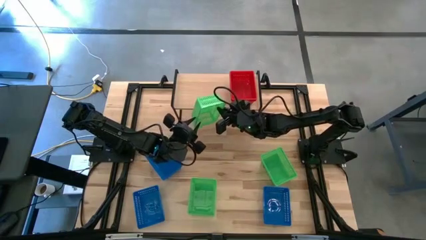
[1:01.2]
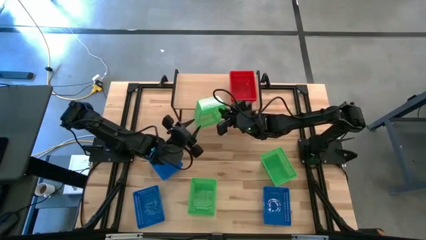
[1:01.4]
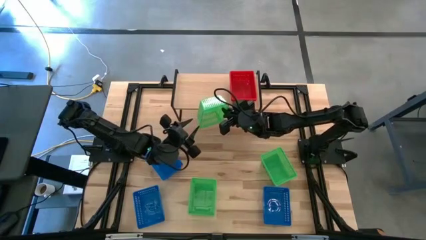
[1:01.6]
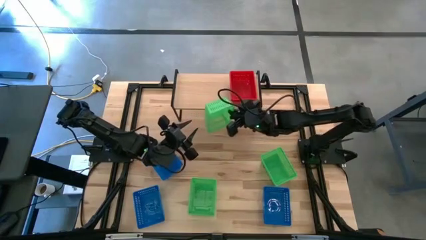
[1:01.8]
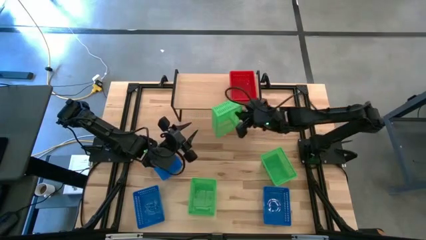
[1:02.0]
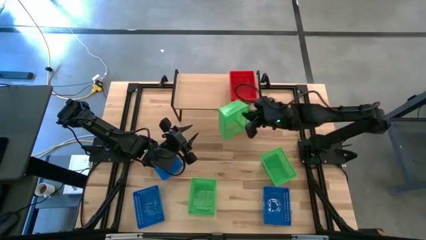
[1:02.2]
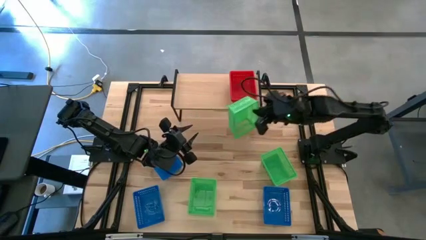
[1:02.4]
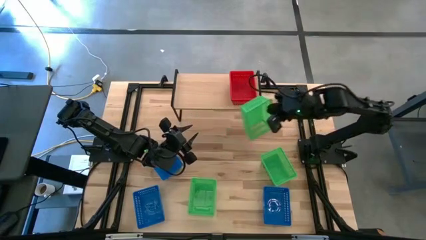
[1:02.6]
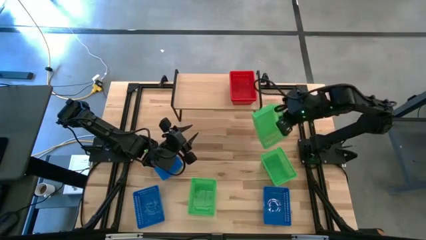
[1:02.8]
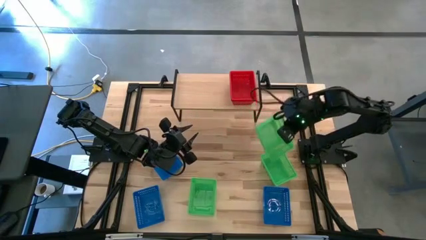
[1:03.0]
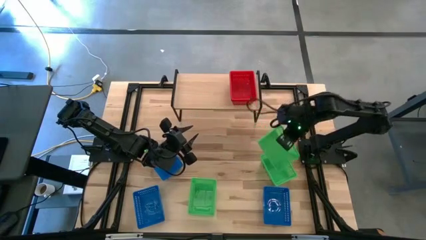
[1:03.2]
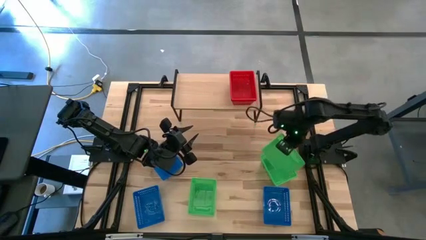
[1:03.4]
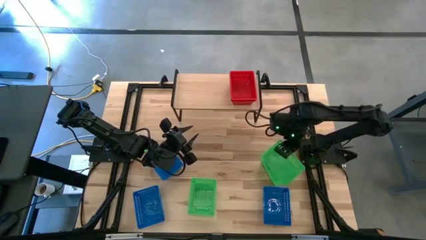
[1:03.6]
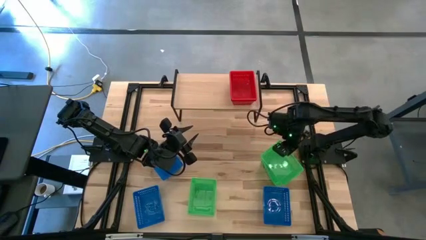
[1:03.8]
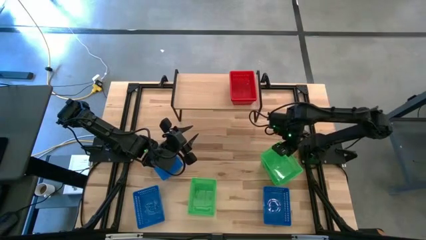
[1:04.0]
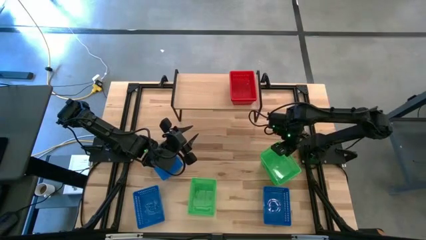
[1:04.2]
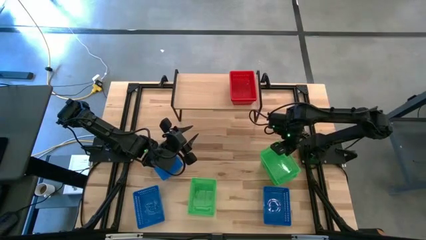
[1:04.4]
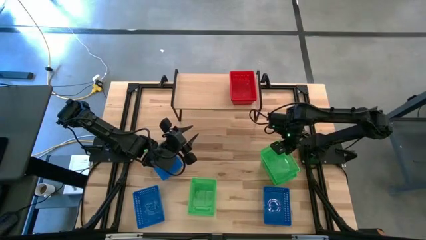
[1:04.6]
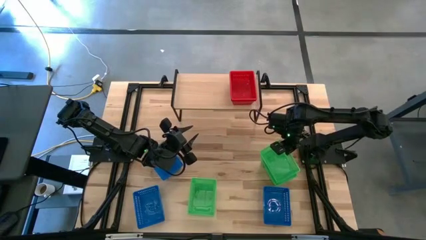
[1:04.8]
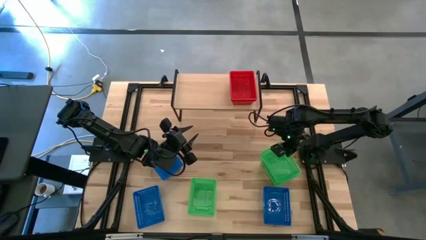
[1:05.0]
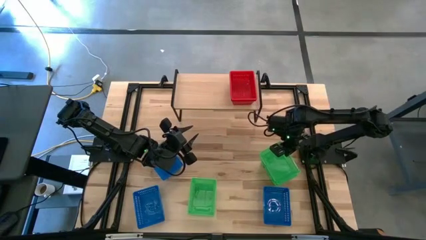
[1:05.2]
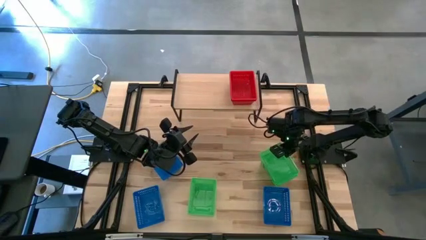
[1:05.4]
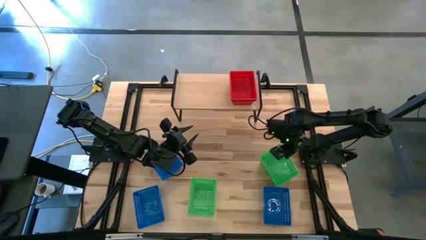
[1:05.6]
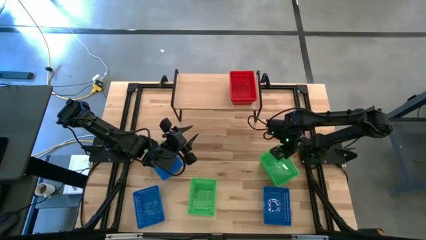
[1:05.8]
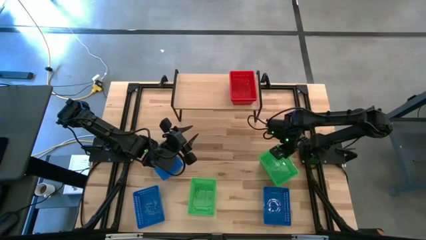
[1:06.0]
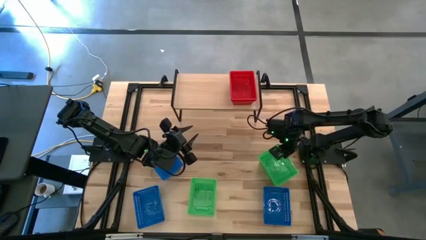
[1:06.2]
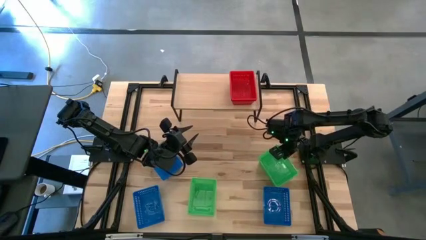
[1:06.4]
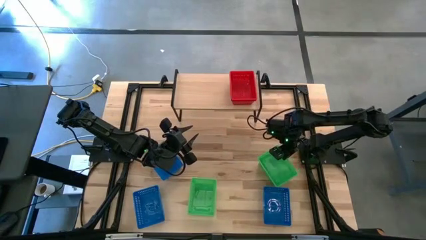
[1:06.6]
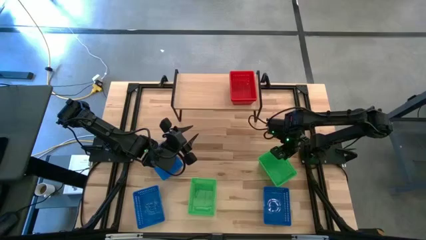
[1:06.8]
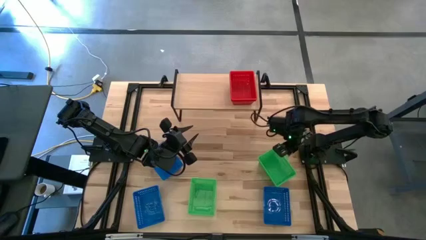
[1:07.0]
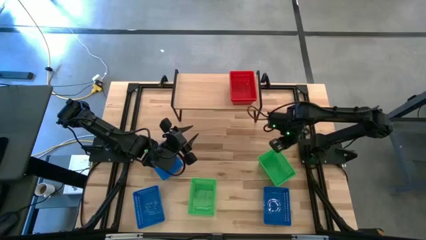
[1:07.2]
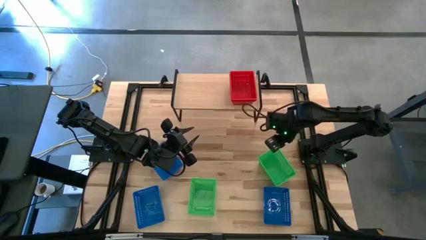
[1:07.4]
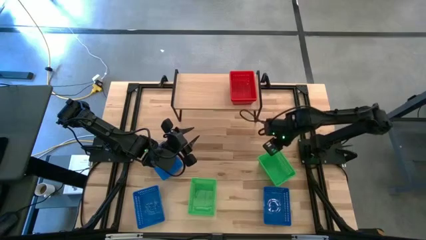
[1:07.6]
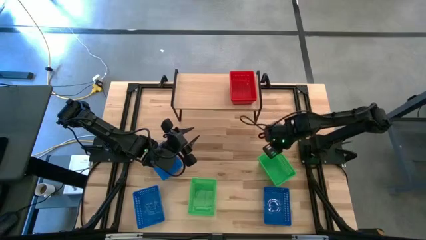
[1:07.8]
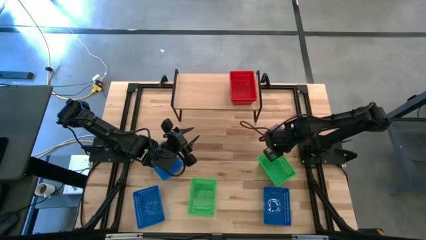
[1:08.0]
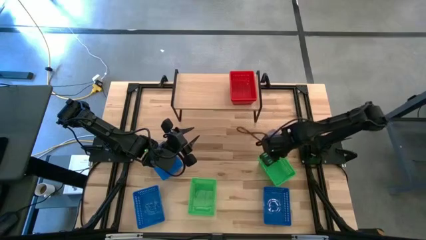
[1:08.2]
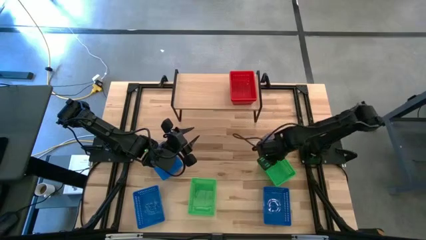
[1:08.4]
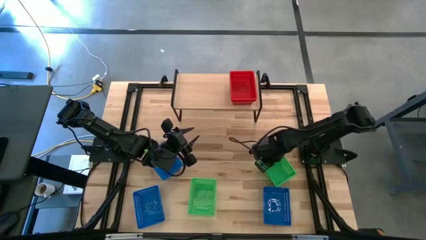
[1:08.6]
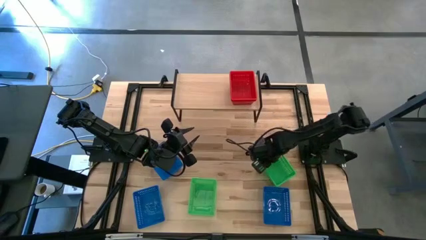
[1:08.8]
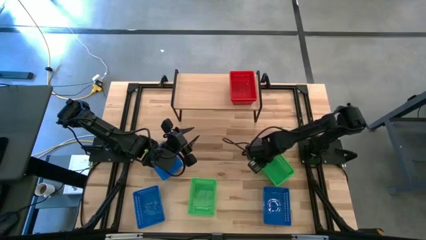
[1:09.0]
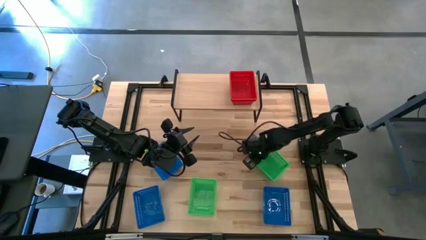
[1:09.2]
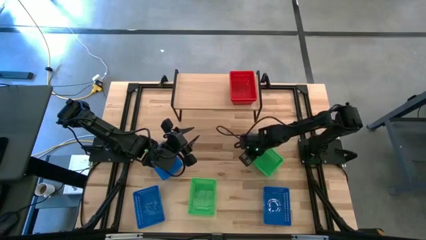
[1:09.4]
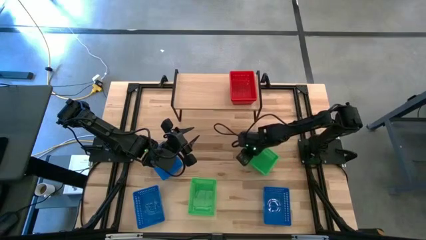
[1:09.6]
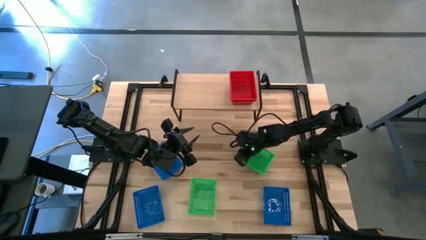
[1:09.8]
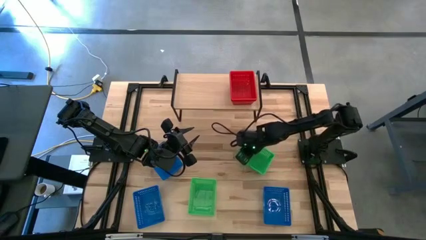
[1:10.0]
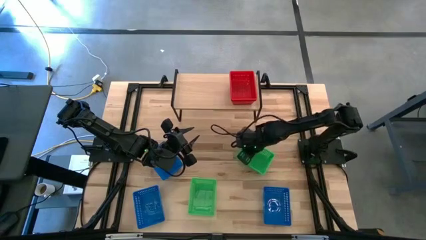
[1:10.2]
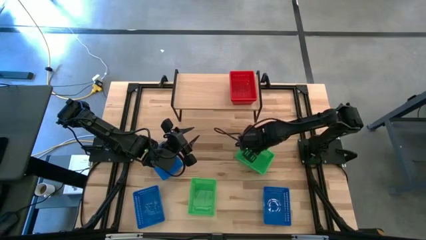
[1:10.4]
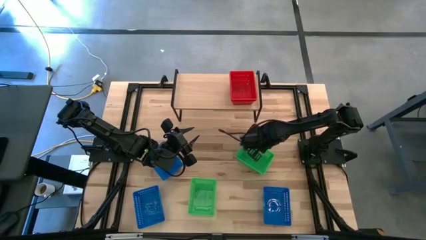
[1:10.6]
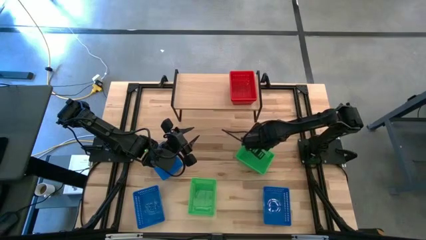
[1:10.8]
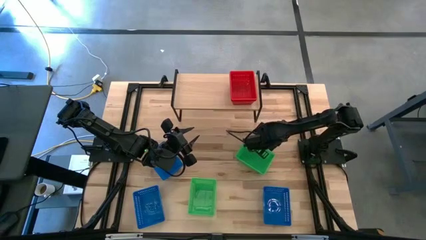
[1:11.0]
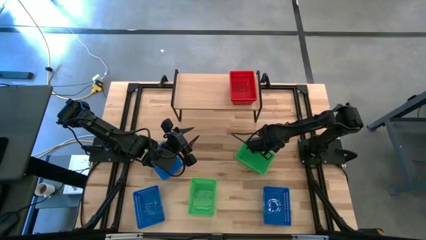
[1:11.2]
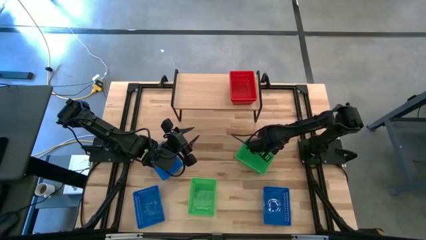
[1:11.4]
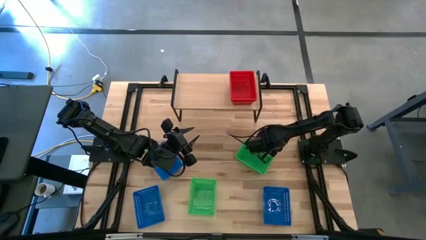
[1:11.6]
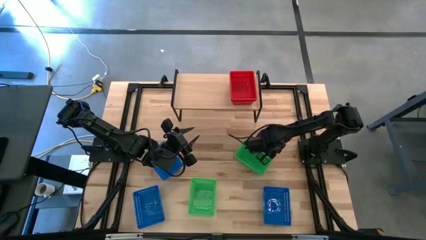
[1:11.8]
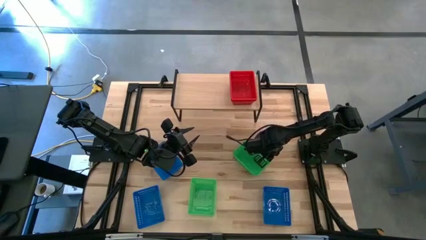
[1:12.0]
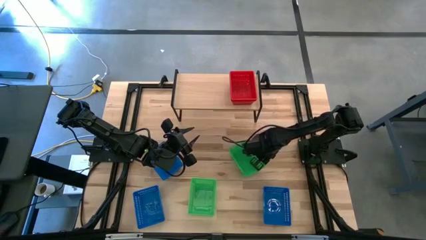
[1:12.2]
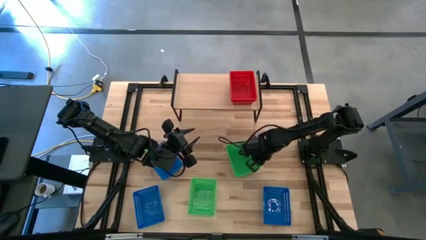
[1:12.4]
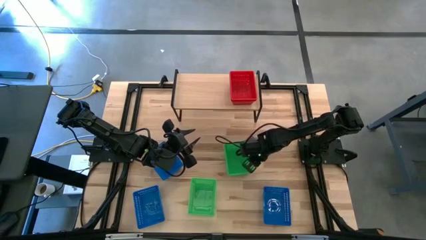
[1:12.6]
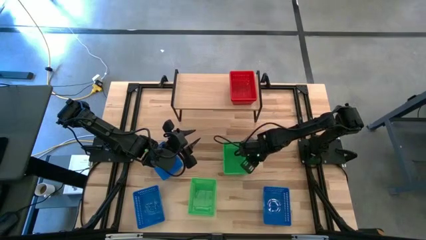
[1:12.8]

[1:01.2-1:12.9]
Task: Stack baskets on shelf by color
Stack the top left green basket on the top of the right green basket
